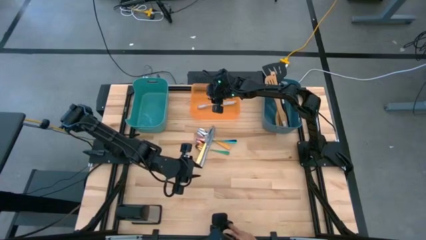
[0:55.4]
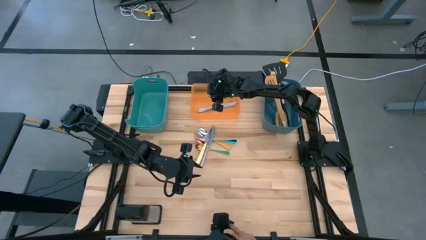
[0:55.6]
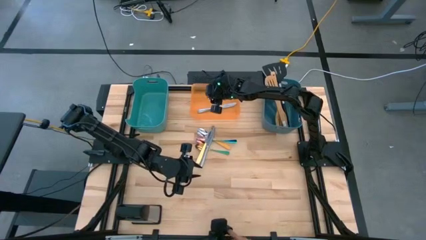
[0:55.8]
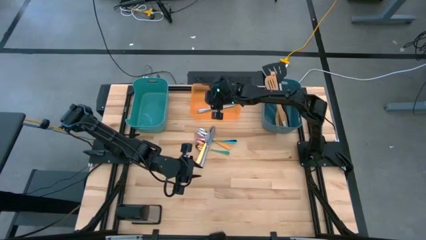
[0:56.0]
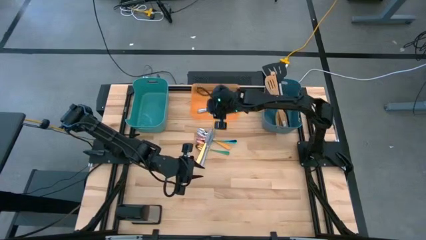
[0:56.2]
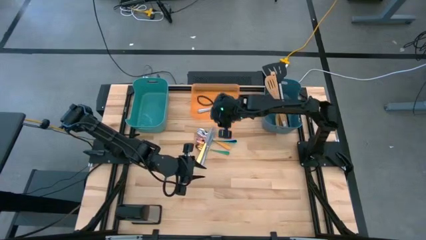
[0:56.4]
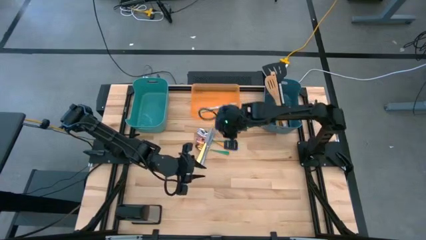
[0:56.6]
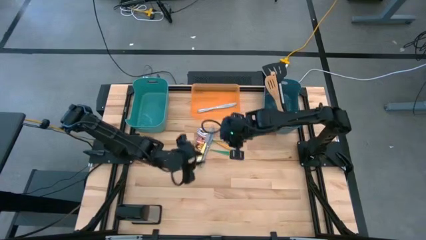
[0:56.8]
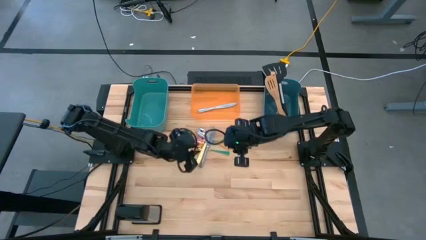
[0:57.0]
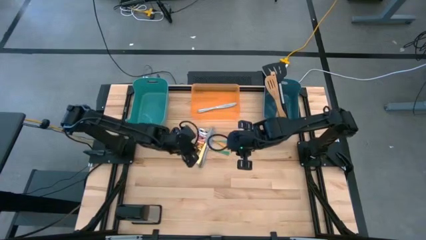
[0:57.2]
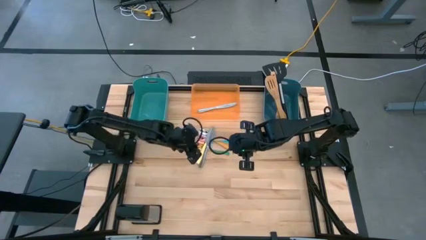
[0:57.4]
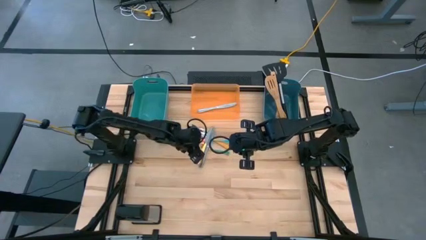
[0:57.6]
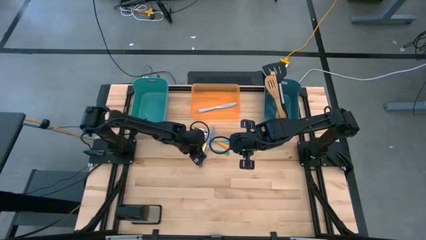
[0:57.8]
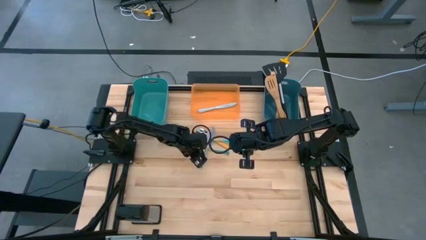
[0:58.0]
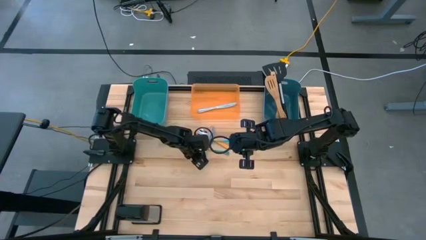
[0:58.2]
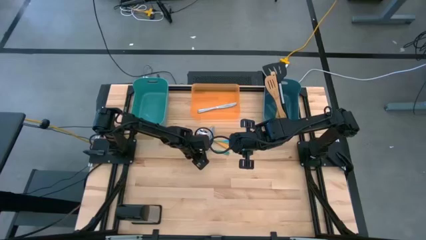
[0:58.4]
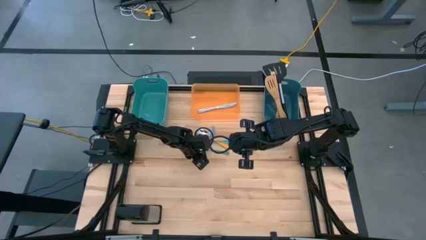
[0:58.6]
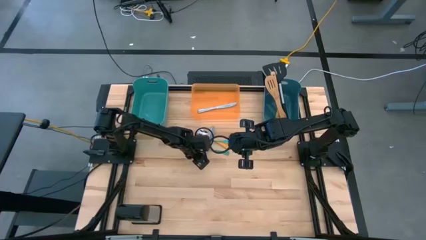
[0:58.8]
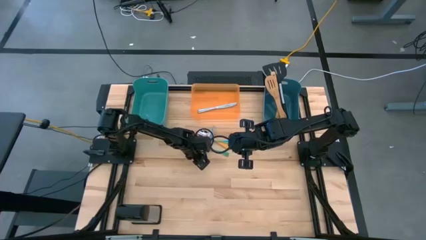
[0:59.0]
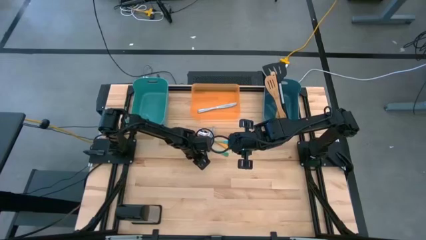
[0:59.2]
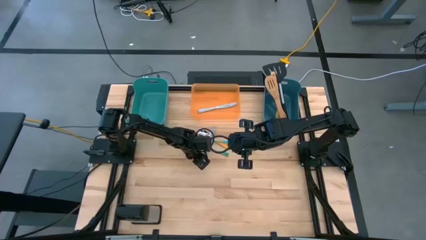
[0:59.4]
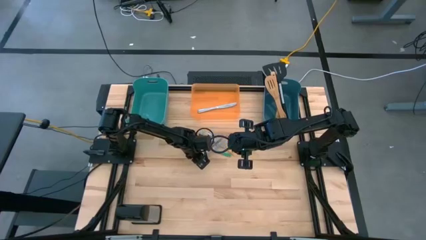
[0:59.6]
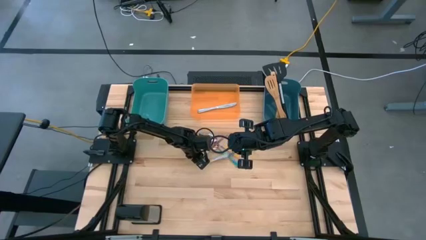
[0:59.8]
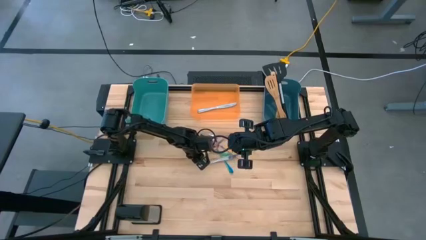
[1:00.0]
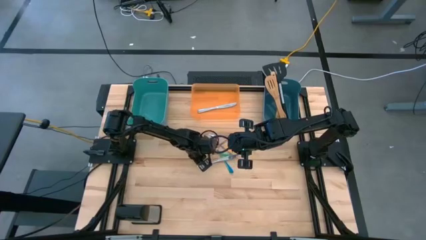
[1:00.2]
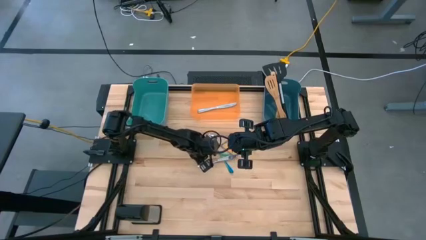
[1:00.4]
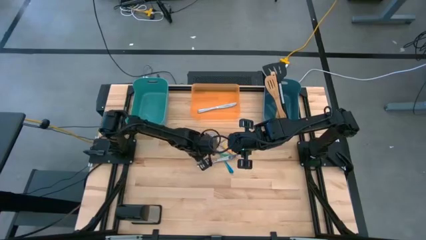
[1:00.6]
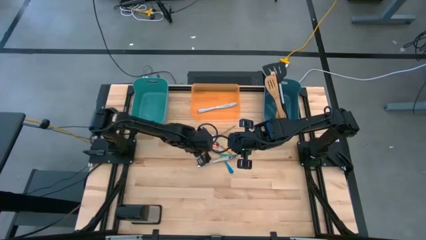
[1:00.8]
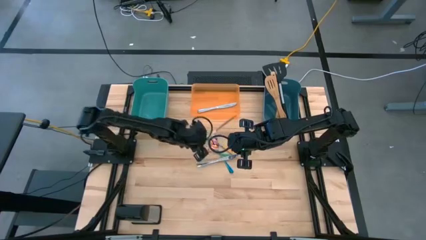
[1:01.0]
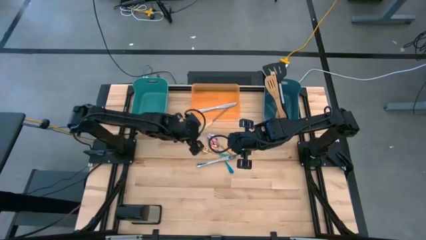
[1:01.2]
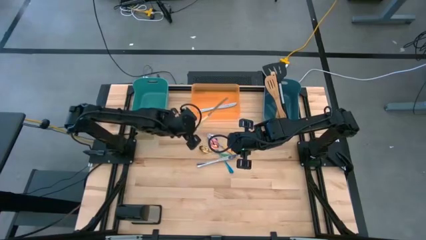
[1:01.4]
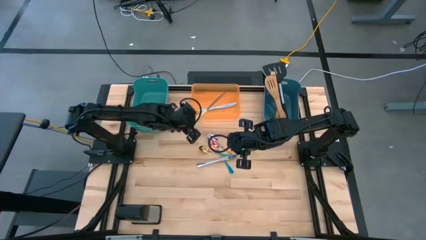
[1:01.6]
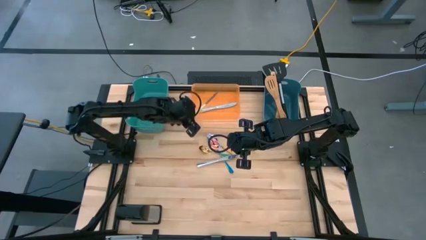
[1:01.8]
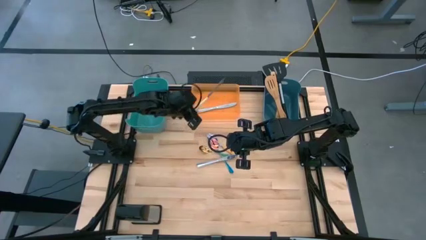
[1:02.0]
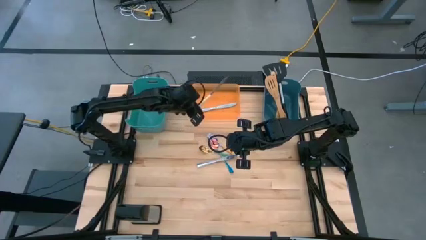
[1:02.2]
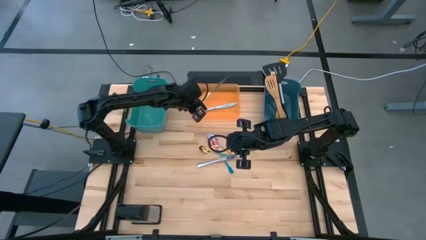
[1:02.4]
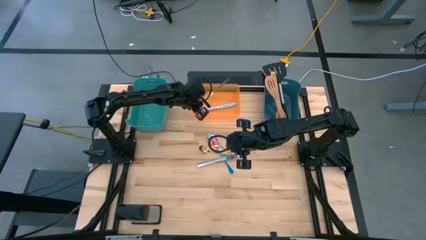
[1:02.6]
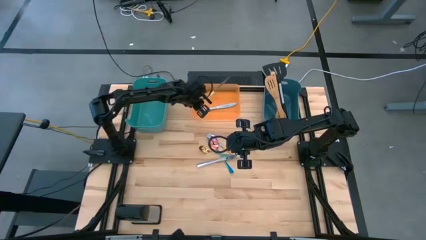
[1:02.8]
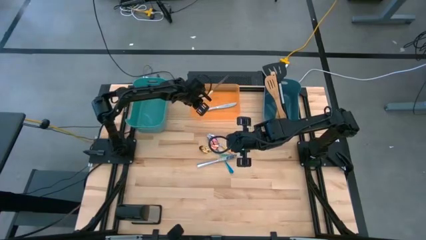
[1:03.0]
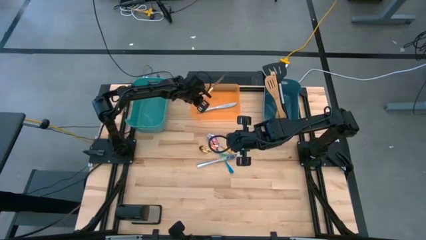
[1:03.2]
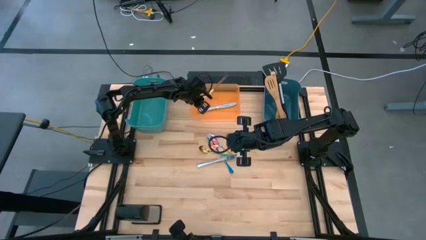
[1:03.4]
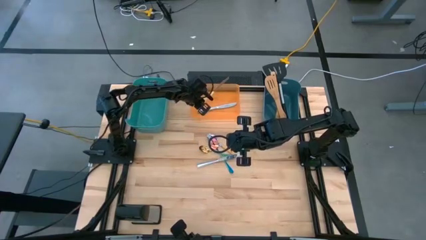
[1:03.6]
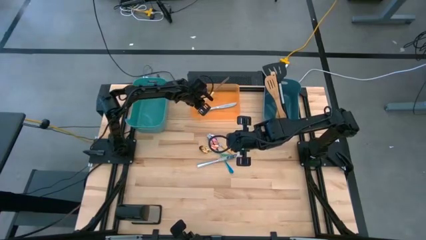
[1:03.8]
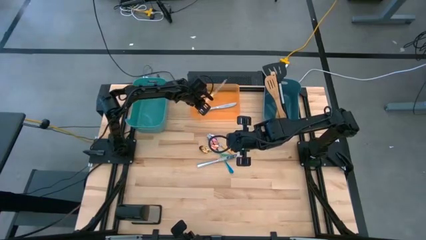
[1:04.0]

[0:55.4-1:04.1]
Task: Pick & Place Kitchen Items
Put the yellow knife into the orange bin

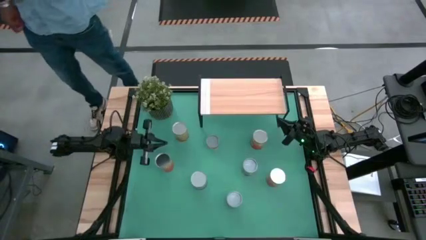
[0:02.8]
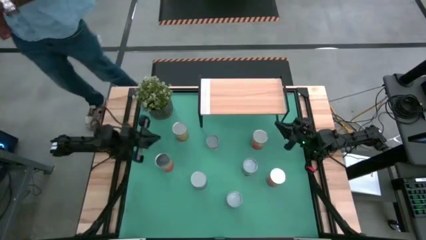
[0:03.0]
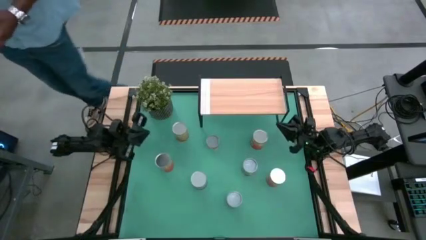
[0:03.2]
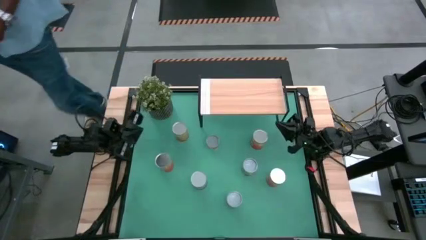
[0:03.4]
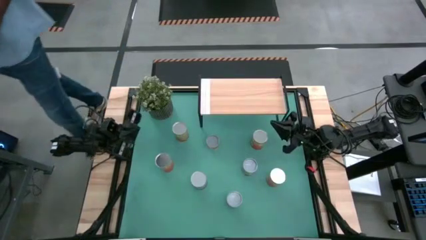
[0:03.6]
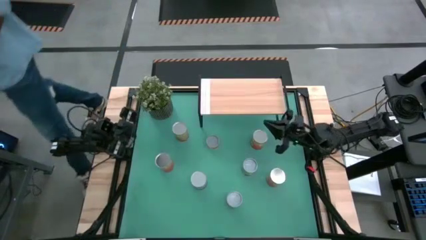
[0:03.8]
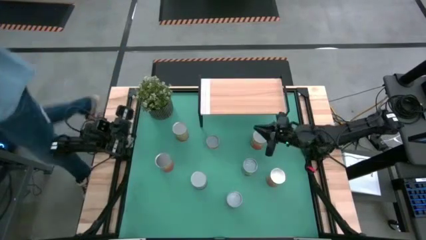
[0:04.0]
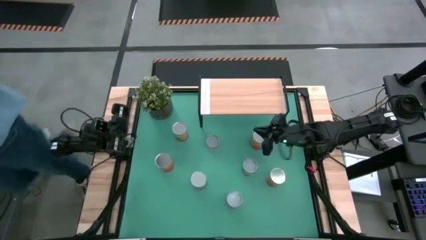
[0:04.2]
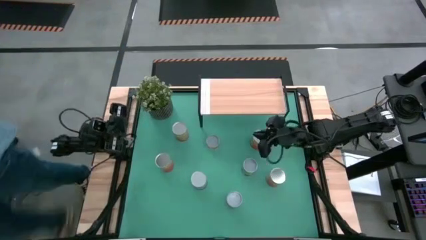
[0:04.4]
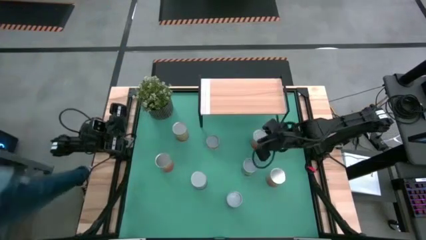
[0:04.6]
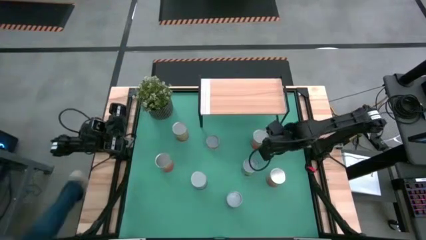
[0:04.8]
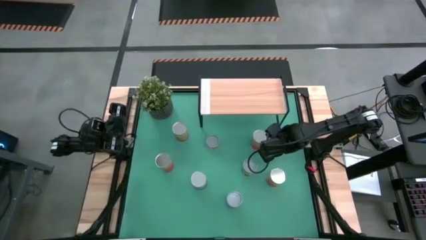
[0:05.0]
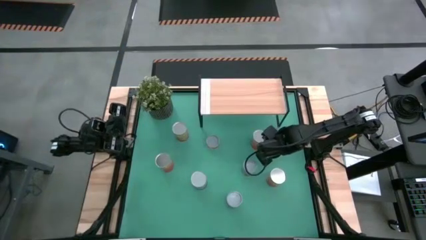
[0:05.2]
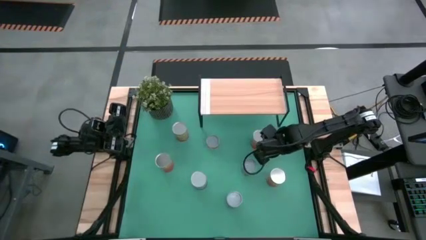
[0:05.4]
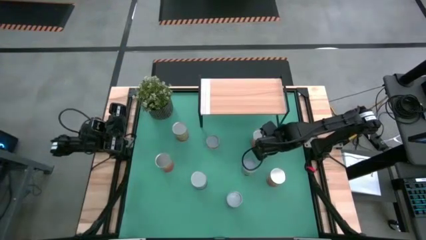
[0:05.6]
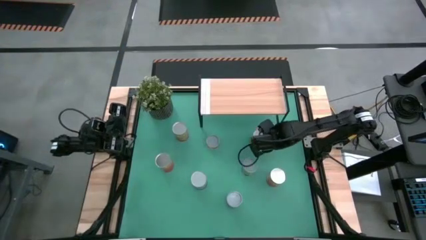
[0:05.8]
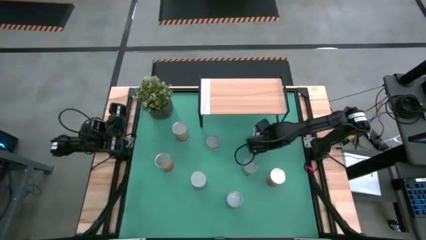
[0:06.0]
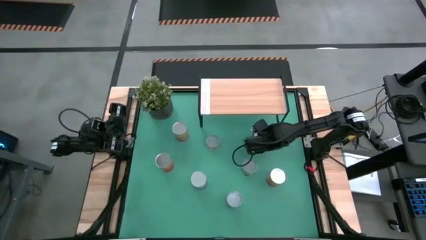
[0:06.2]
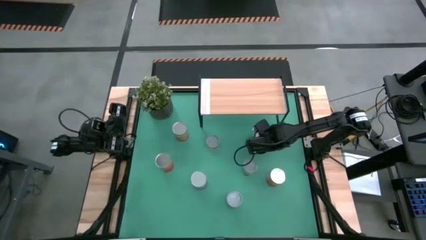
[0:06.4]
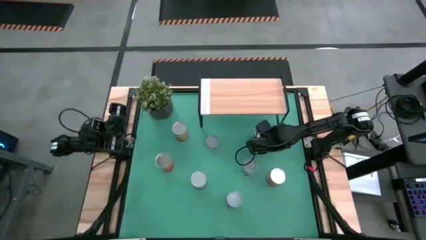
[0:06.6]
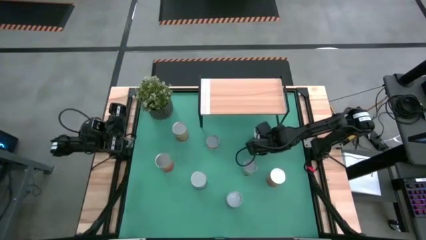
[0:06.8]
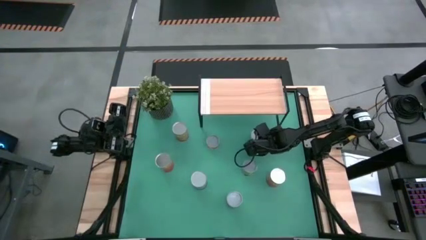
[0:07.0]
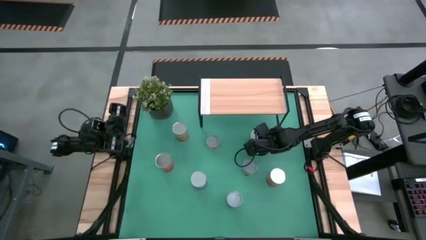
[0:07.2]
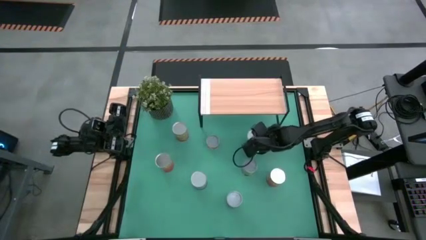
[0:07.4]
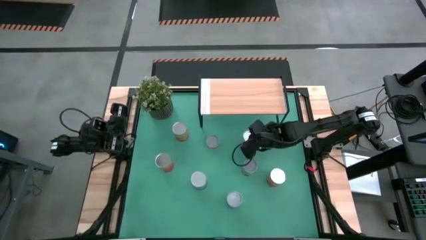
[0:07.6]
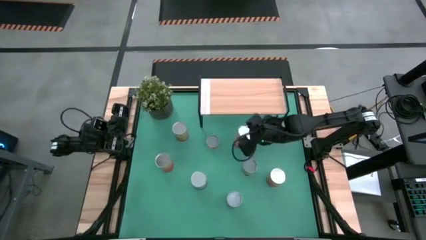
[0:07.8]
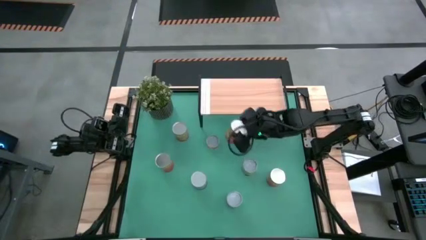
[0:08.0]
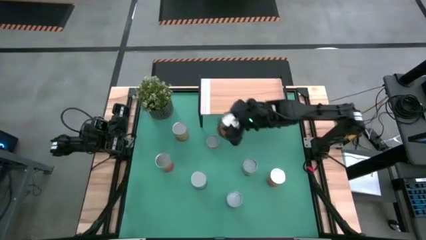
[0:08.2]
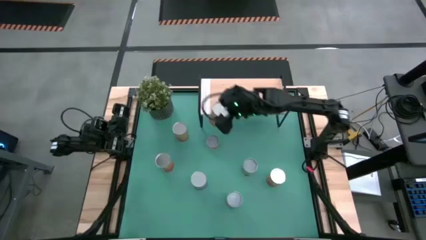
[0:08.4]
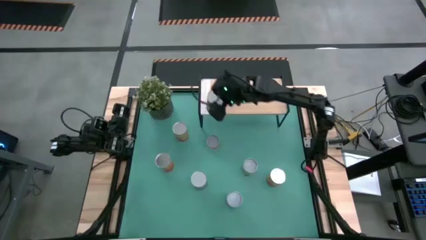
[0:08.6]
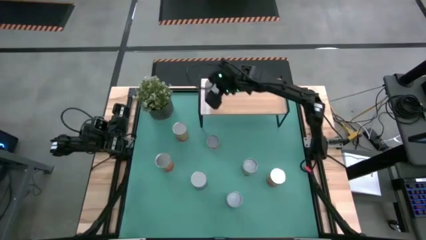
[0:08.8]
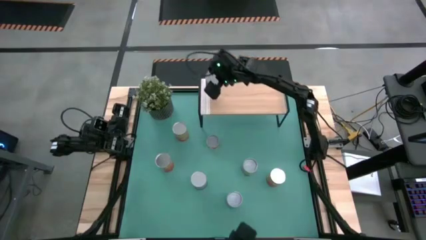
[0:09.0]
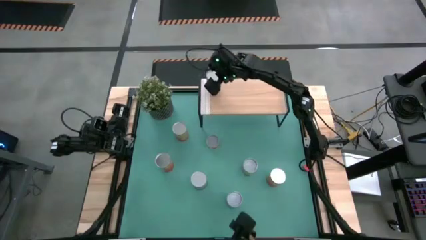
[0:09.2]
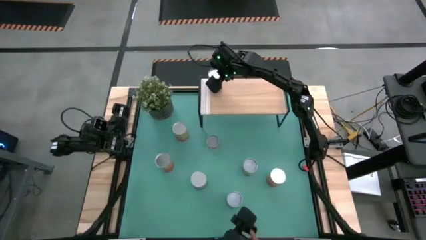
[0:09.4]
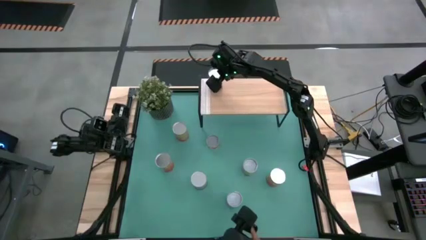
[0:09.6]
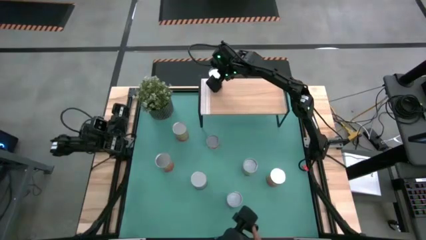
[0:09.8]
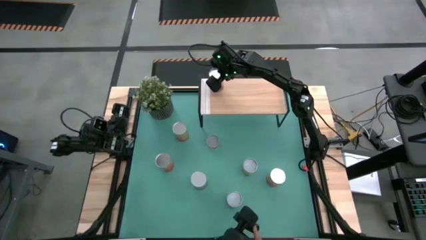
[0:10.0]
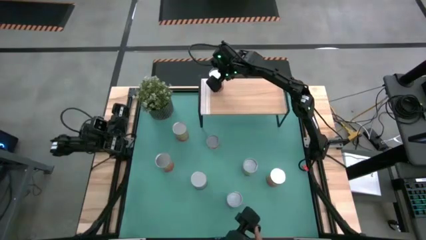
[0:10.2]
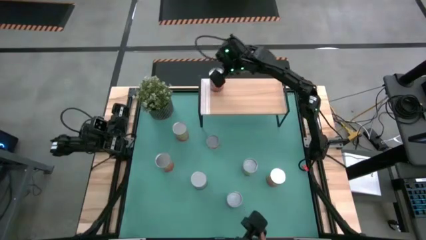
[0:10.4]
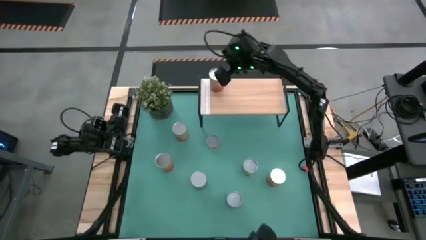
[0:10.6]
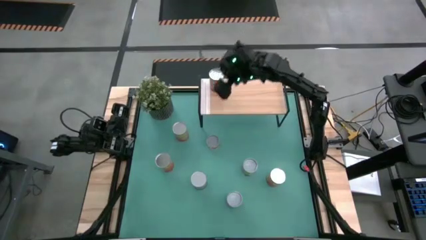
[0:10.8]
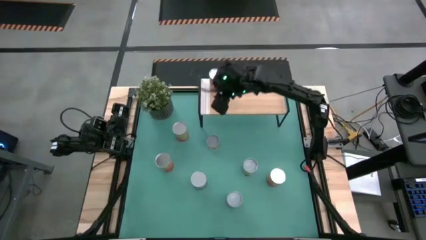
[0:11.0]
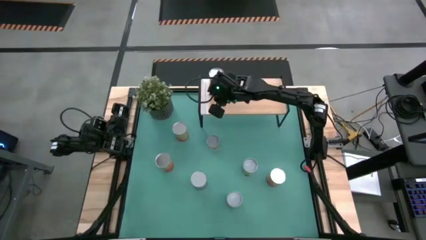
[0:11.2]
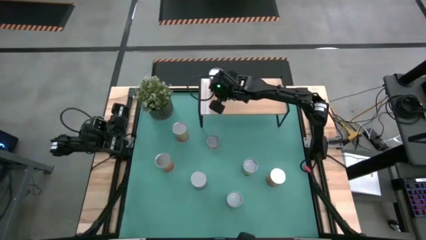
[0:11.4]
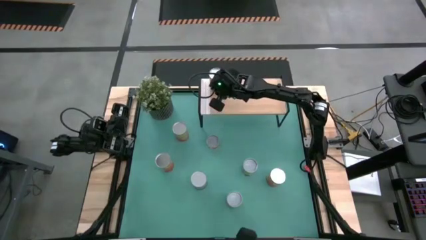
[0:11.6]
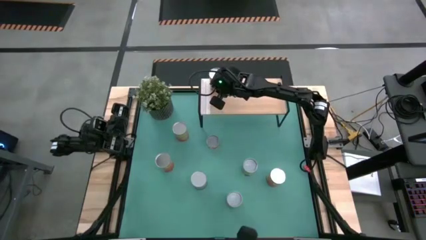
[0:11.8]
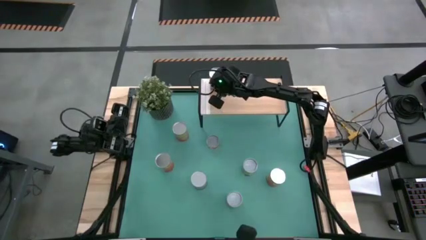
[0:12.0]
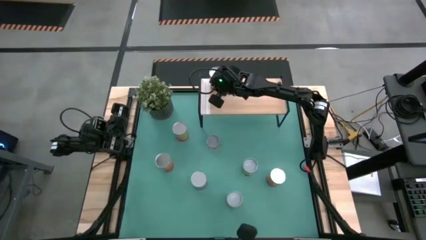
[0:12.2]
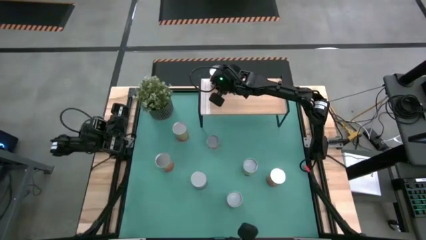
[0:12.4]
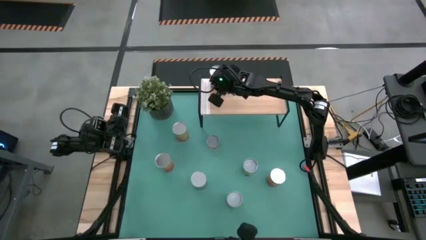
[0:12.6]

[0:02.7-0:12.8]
Task: Pick and place cans onto a shelf
Put the canned corn on the shelf
